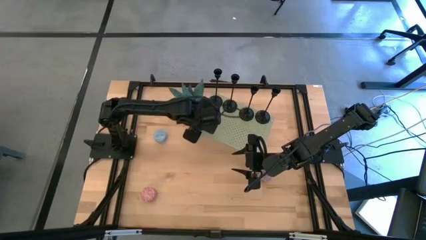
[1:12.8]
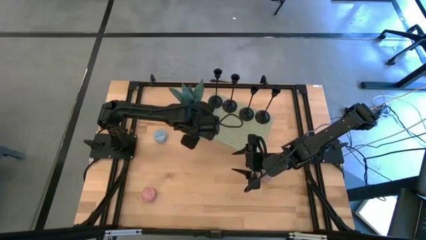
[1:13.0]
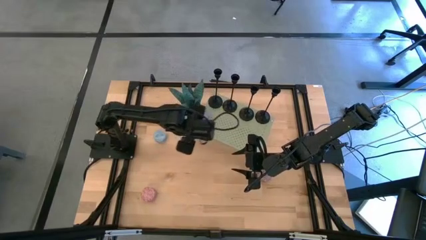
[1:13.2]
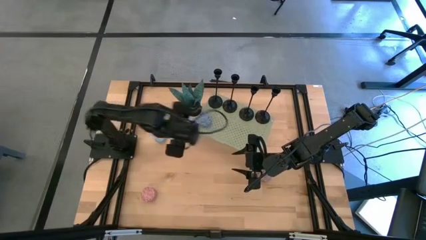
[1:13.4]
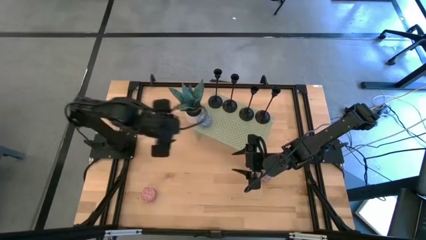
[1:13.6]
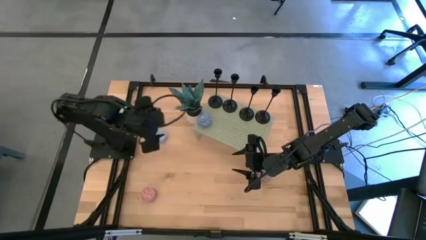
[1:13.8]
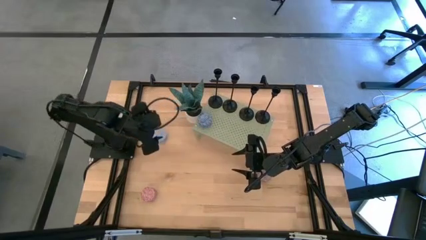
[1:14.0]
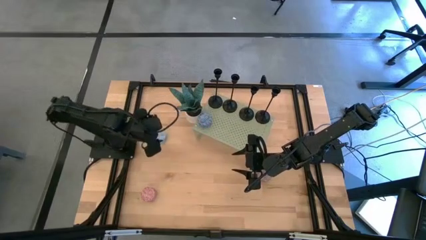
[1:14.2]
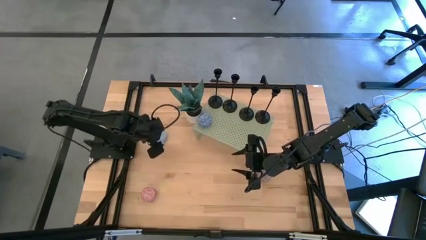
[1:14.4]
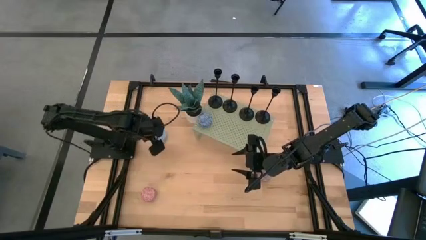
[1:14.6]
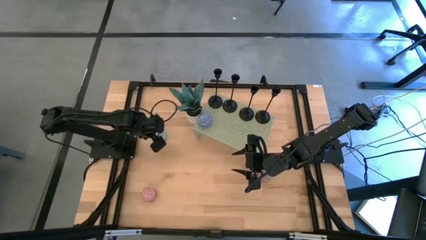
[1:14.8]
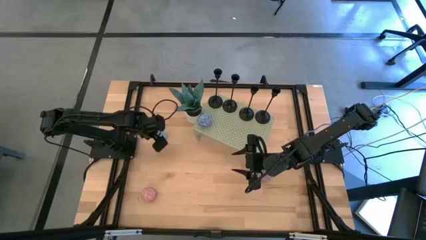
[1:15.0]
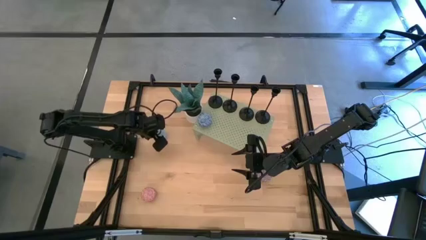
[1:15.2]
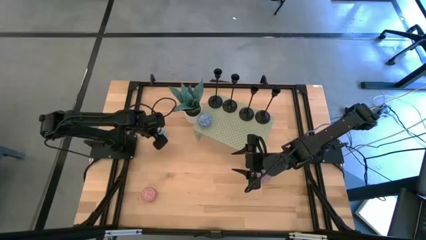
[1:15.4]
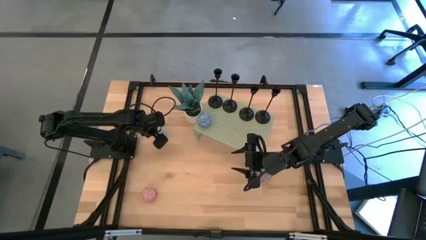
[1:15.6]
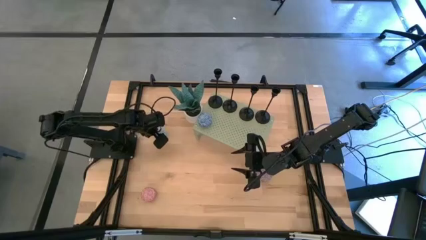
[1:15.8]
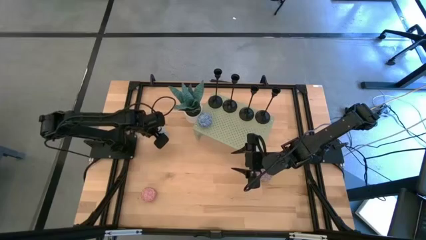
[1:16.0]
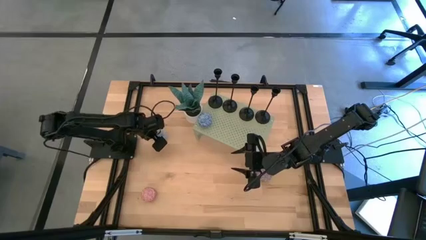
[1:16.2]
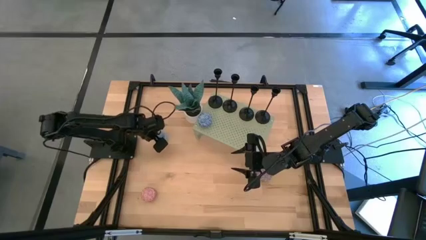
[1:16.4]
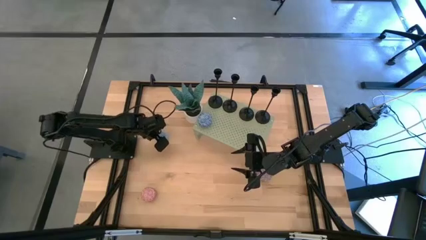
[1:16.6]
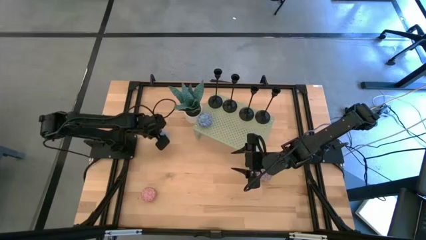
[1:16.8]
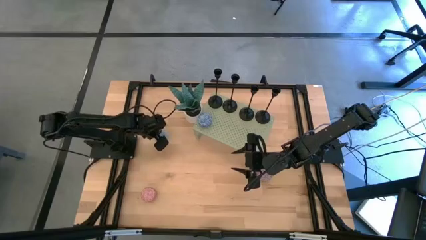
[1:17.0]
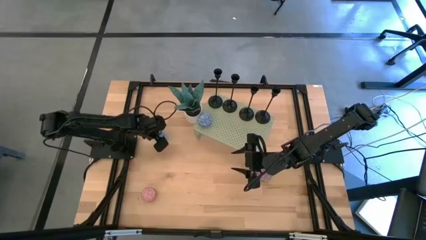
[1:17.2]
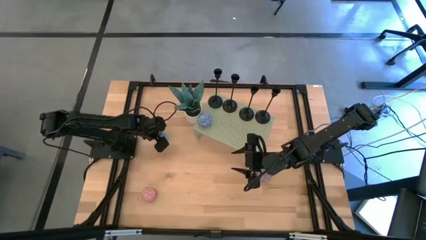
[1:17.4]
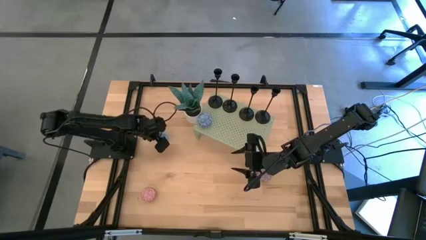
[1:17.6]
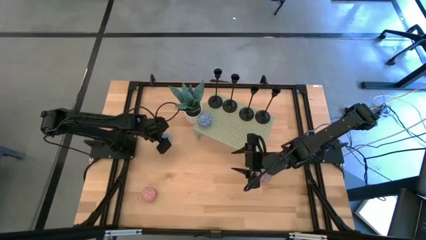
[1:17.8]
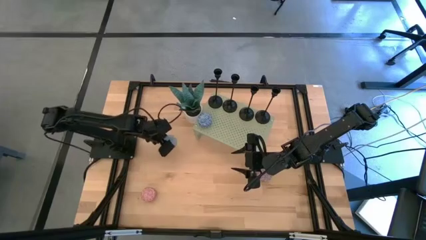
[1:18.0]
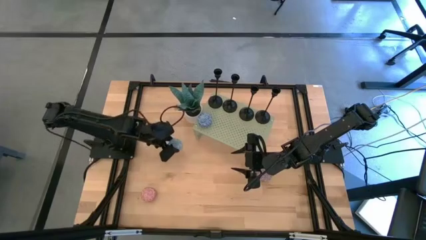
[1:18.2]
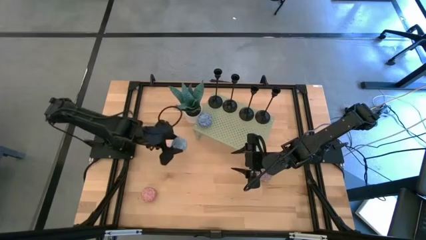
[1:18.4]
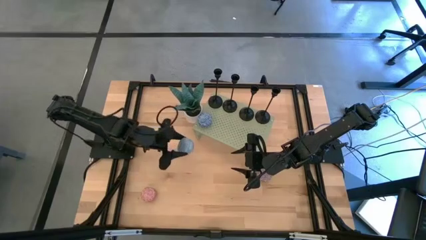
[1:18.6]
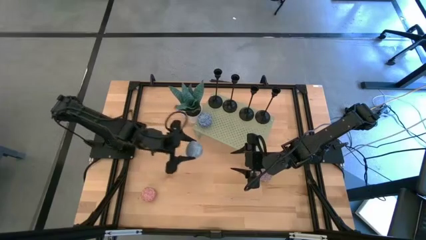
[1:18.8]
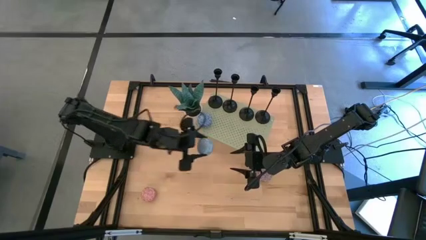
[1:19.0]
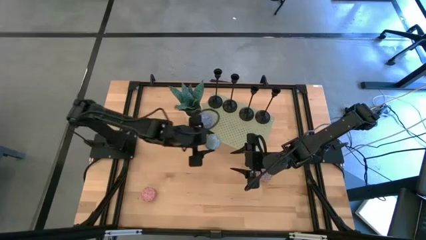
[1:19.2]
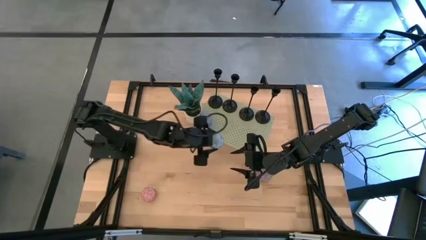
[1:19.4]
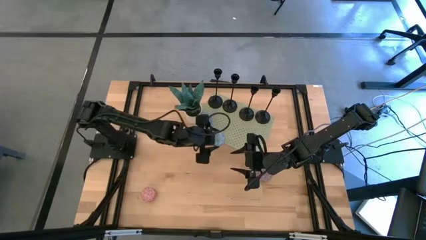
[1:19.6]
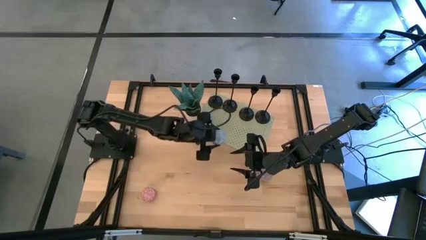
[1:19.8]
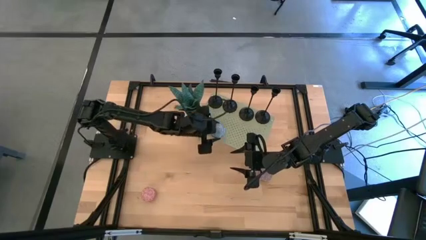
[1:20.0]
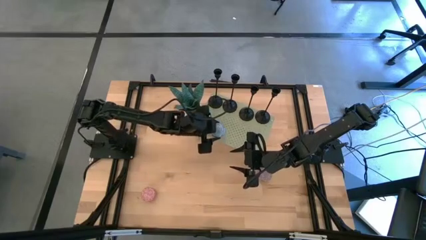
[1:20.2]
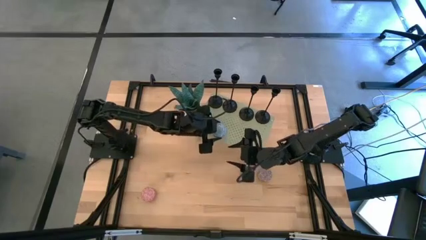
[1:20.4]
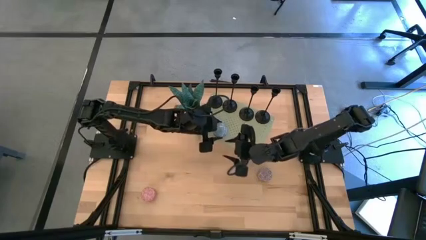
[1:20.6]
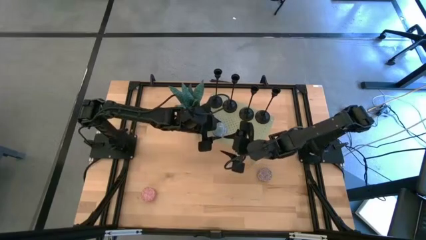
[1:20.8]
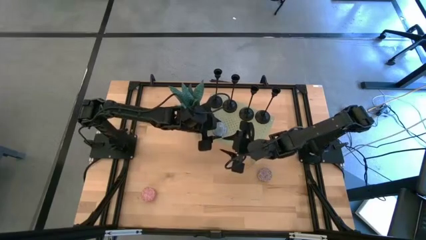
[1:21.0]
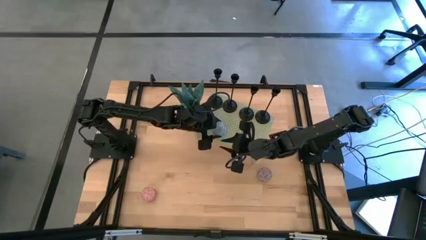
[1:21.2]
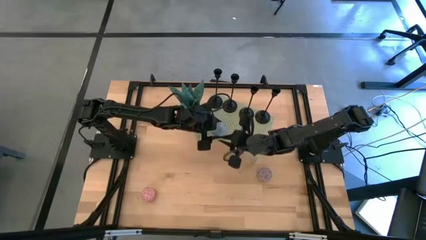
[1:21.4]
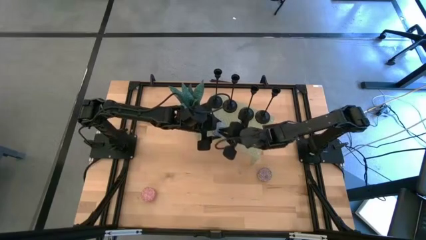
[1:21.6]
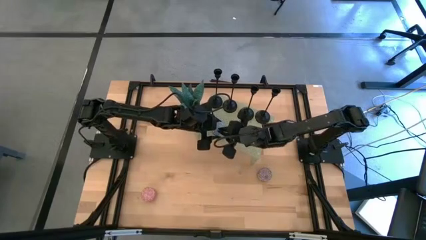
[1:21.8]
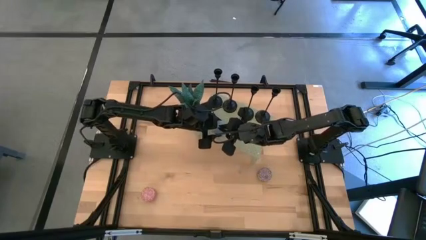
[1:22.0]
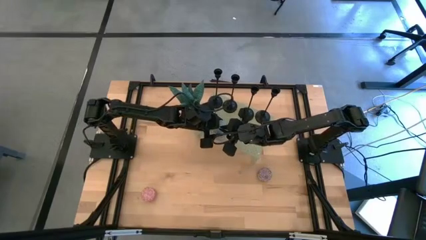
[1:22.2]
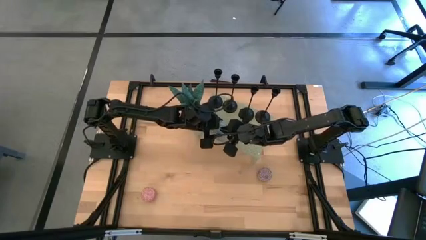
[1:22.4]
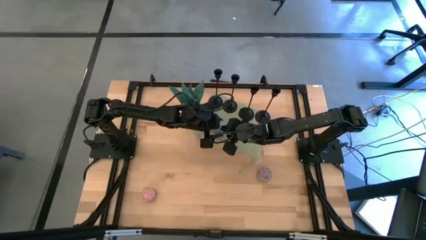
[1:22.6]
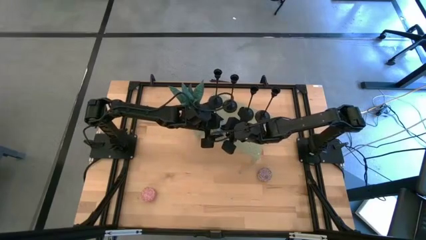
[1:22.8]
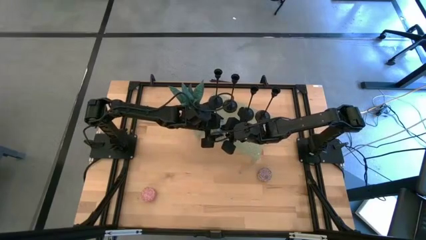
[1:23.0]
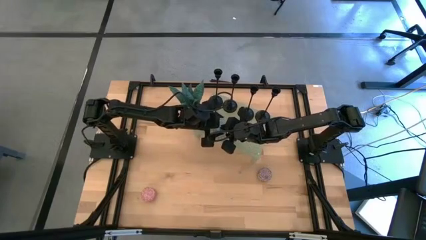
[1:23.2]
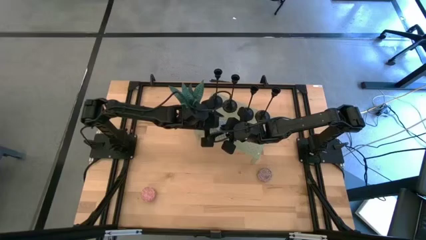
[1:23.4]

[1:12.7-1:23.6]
Task: Stock candles and holders on shelf
Align the light blue scented candle with the other scented candle on the shelf
